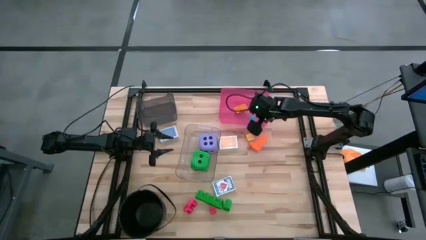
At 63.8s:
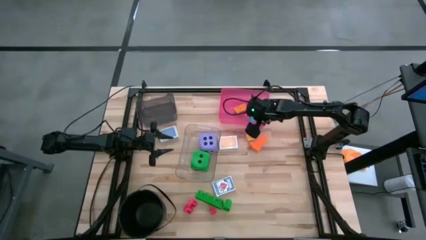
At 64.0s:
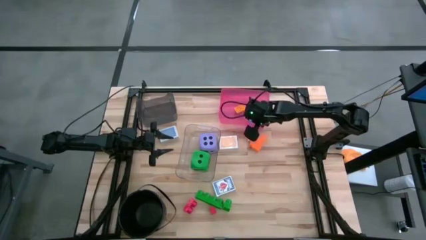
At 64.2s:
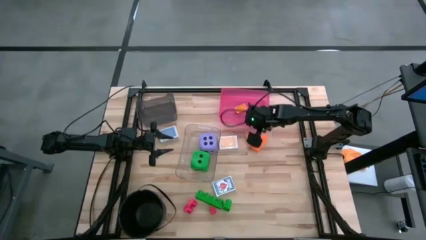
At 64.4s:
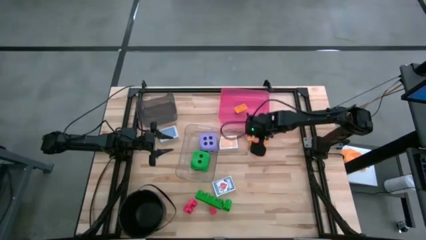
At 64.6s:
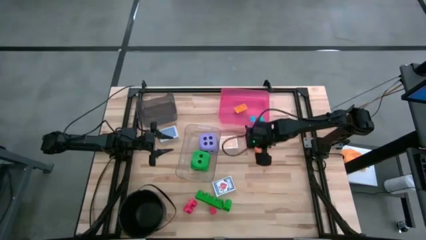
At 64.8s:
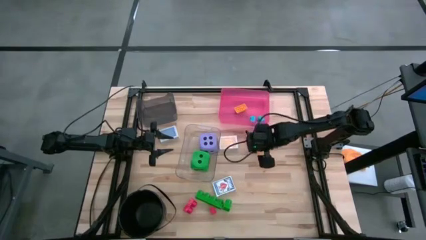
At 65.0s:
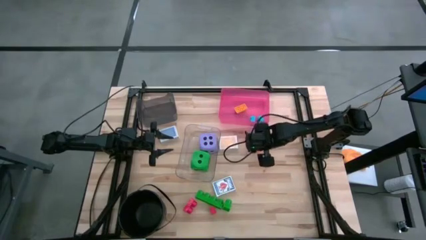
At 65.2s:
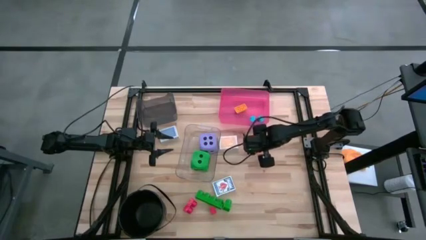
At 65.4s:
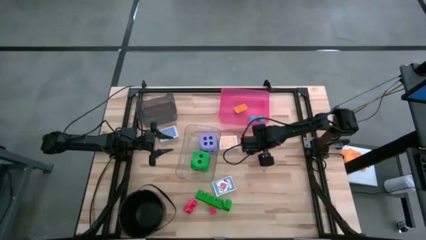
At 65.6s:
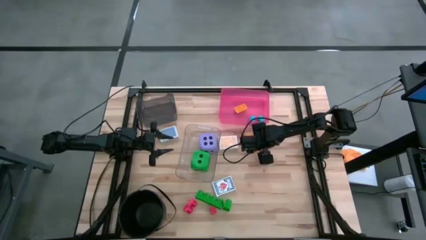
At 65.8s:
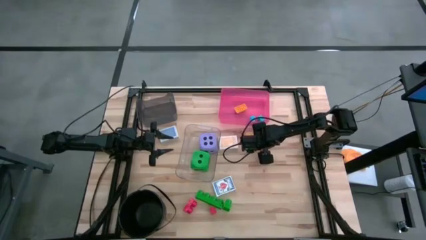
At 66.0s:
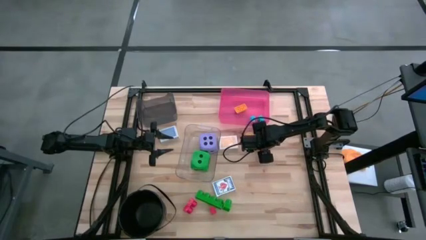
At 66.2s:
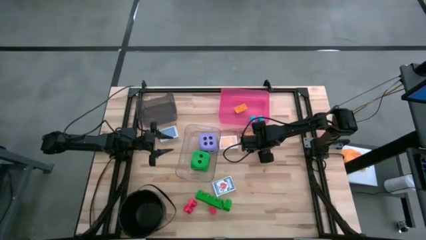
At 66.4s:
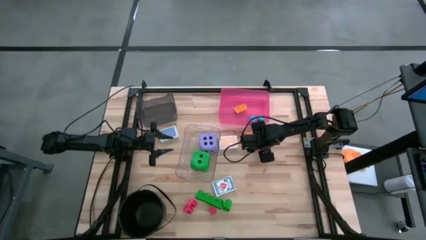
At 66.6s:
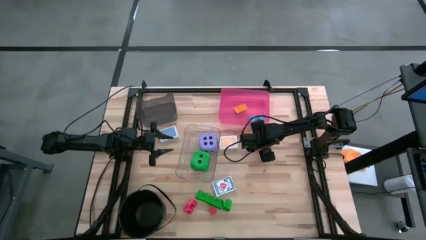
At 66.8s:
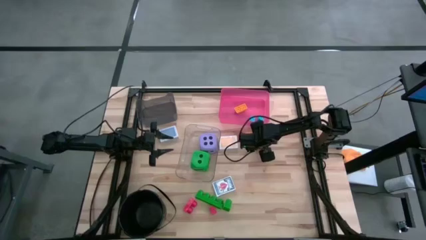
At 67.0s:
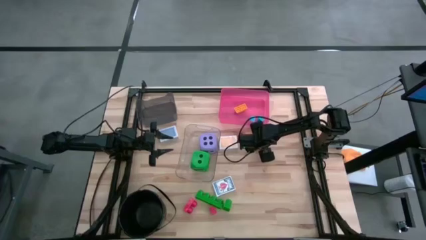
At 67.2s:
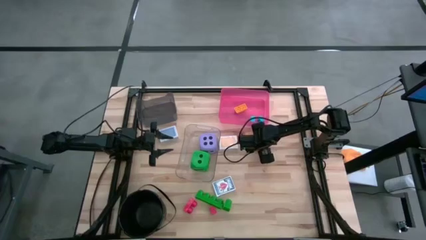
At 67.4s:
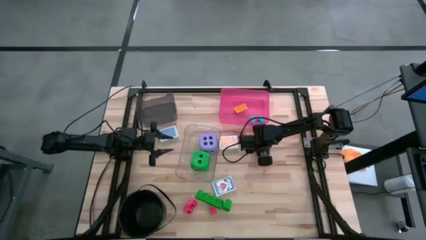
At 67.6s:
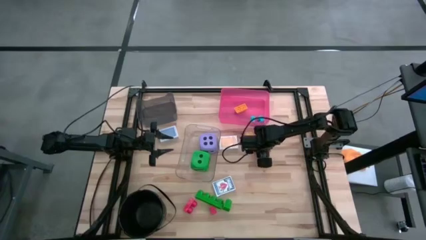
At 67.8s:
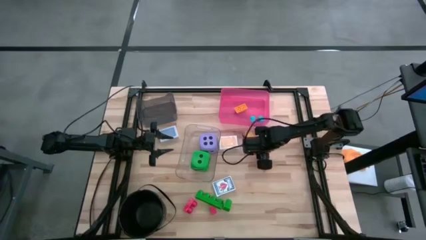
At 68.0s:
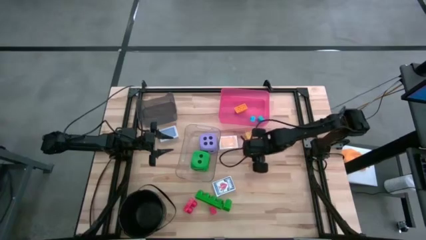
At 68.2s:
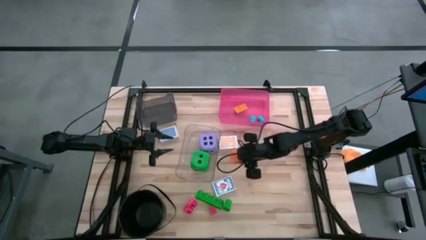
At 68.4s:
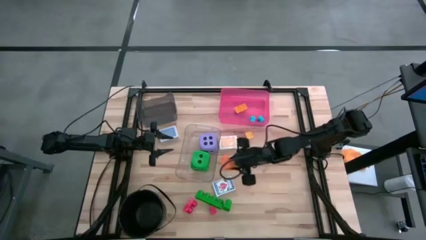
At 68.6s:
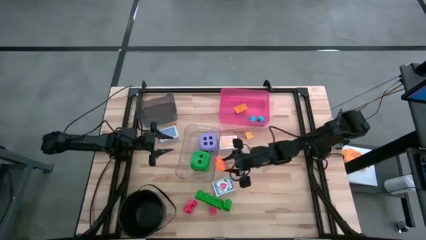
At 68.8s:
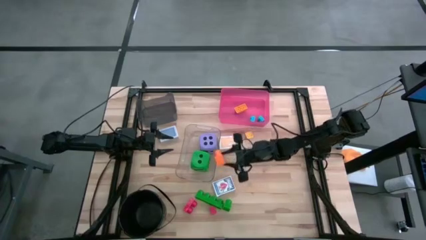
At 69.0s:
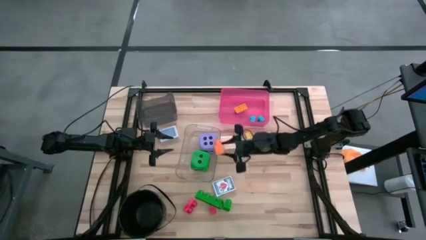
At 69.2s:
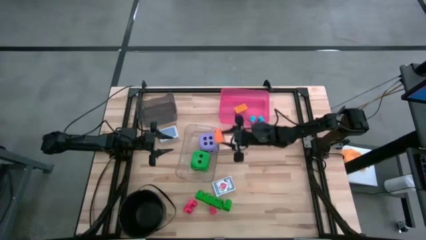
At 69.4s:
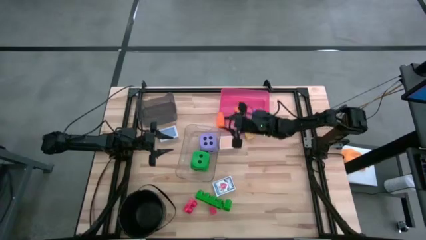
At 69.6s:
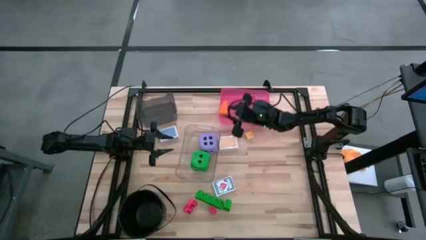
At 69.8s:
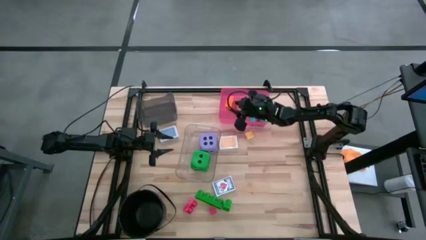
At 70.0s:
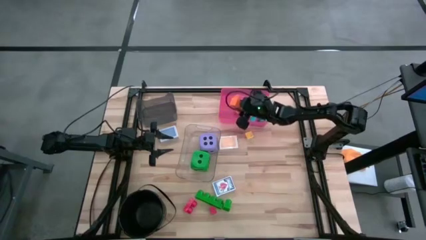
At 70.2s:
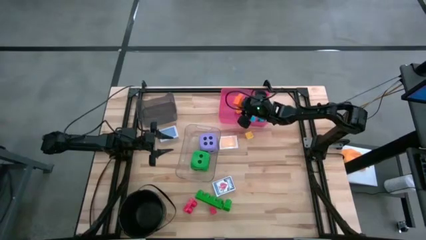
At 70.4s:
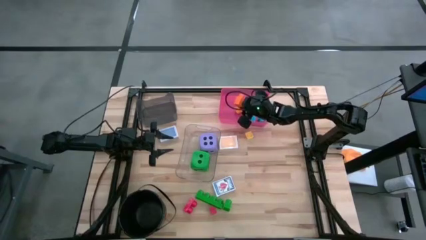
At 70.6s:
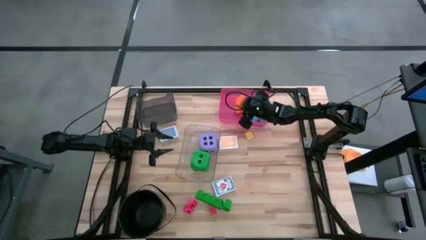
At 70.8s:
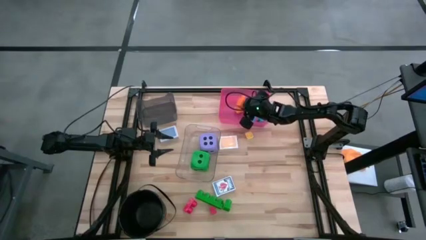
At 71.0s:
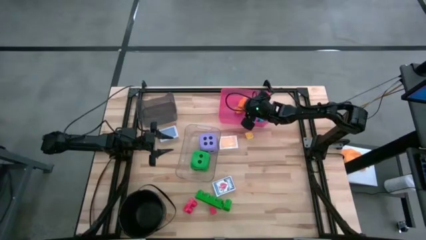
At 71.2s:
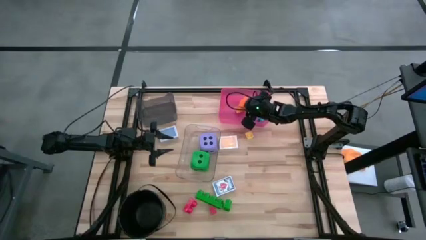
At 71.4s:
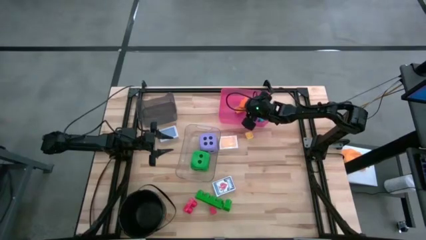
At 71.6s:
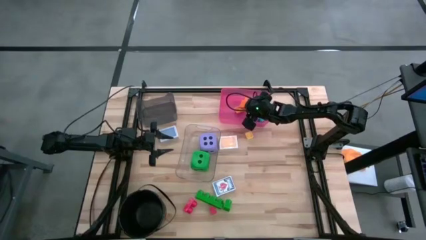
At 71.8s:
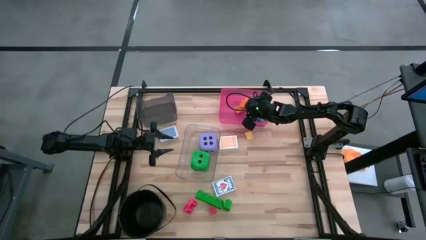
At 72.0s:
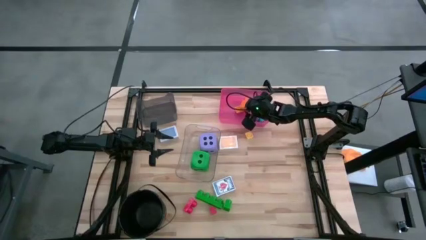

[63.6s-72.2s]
Task: Pick & Place Toys
Put the orange game piece into the pink bin

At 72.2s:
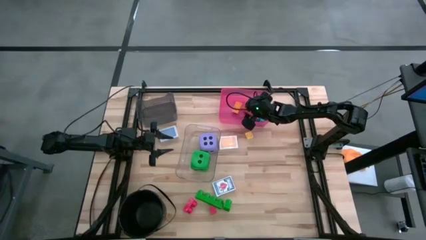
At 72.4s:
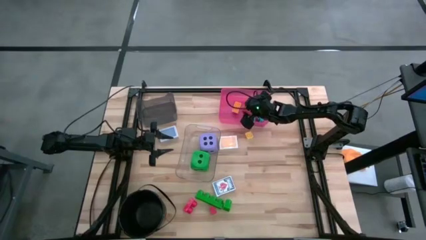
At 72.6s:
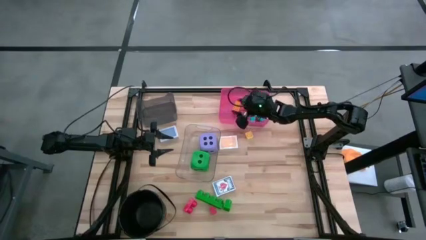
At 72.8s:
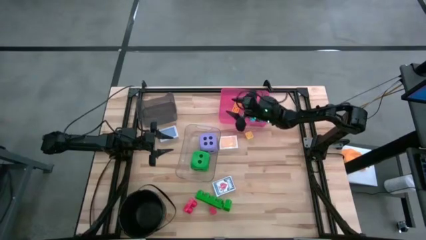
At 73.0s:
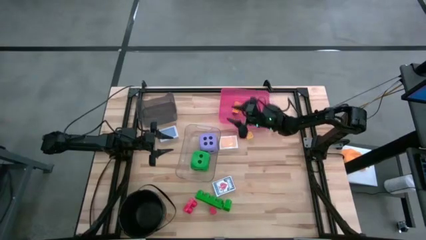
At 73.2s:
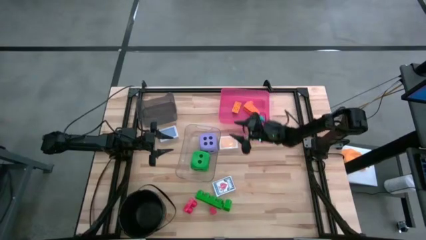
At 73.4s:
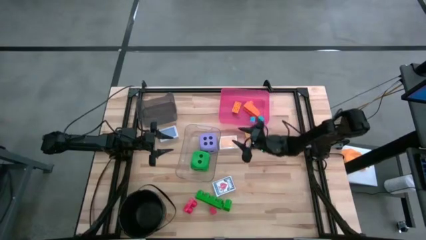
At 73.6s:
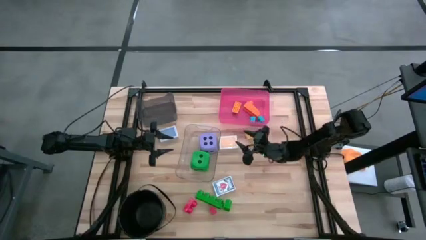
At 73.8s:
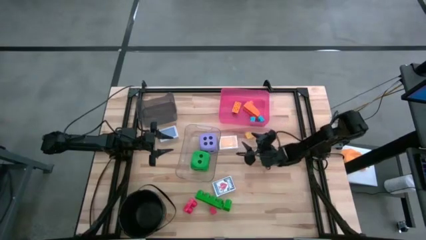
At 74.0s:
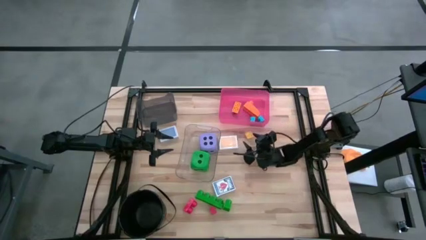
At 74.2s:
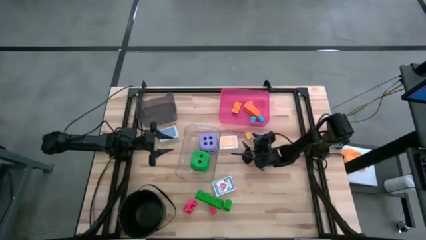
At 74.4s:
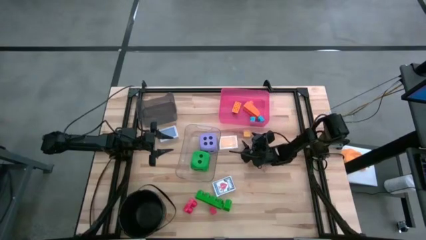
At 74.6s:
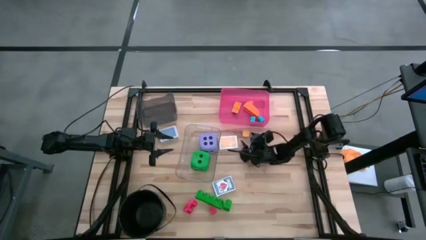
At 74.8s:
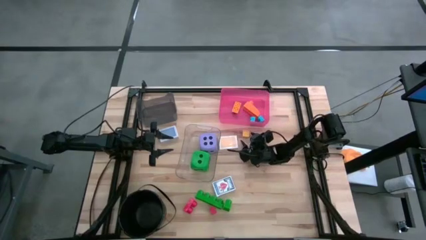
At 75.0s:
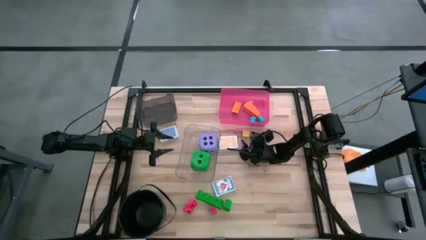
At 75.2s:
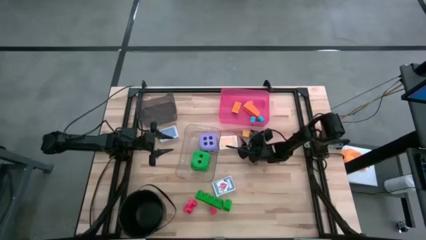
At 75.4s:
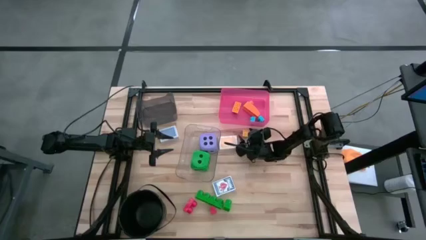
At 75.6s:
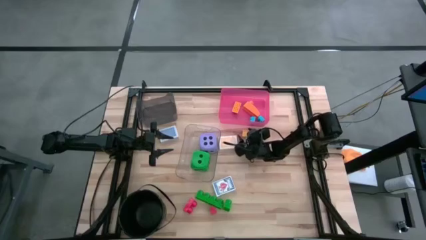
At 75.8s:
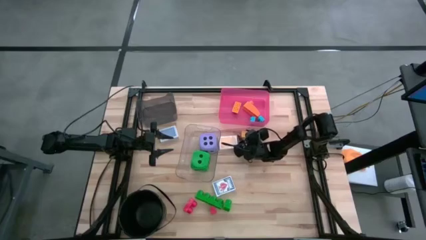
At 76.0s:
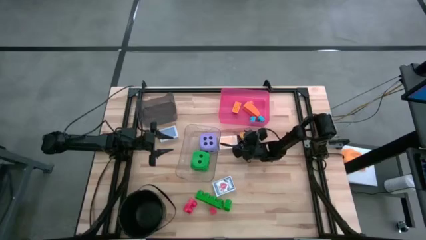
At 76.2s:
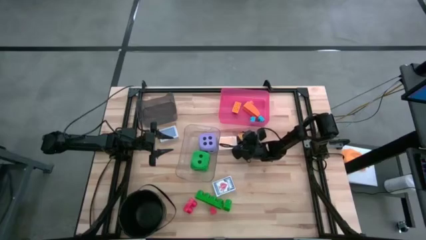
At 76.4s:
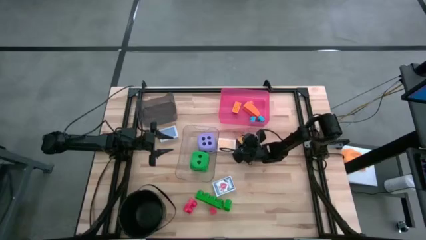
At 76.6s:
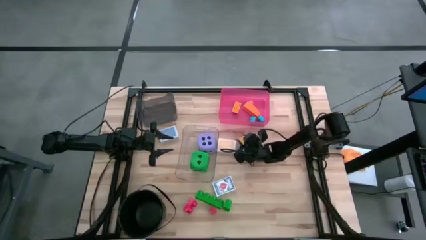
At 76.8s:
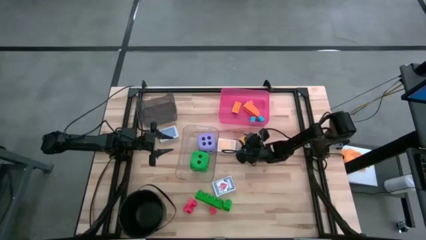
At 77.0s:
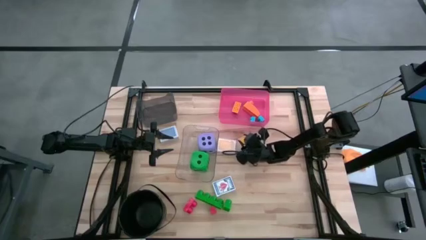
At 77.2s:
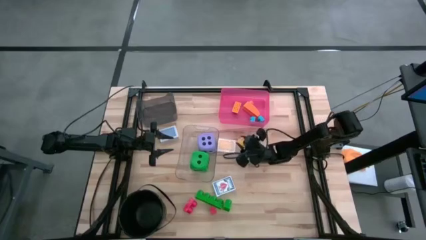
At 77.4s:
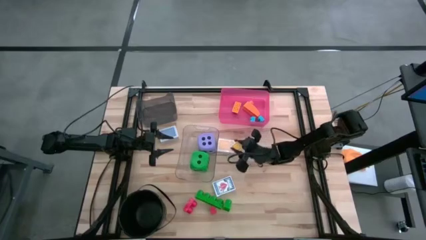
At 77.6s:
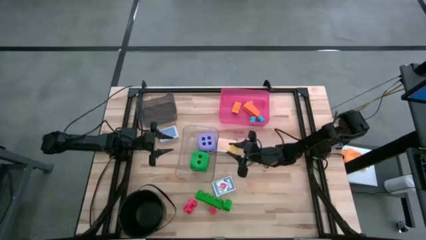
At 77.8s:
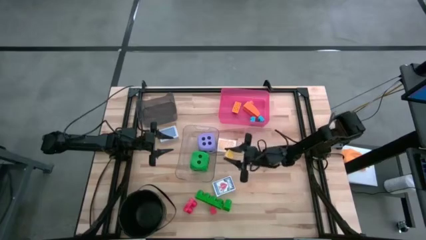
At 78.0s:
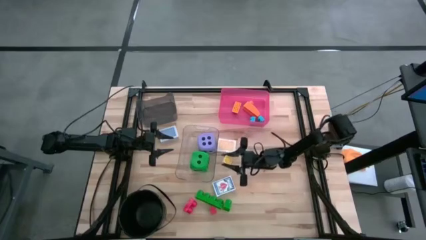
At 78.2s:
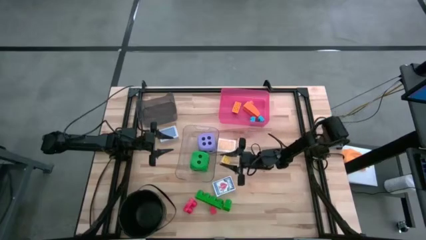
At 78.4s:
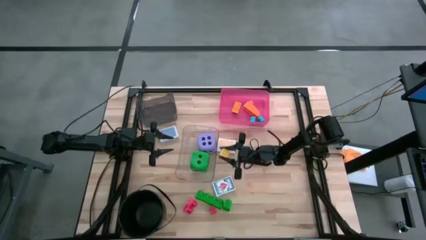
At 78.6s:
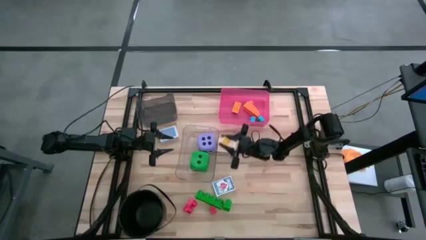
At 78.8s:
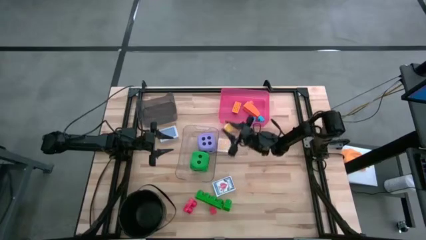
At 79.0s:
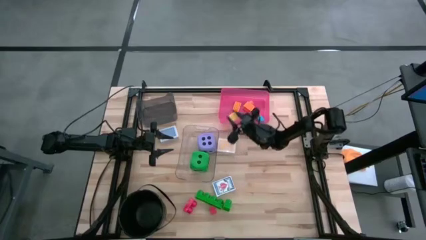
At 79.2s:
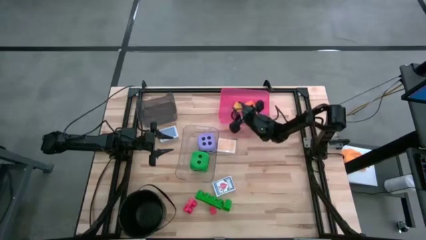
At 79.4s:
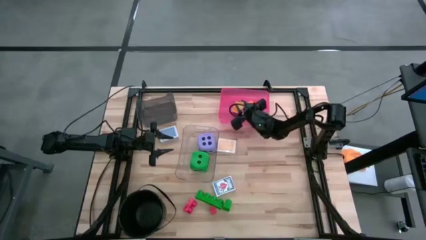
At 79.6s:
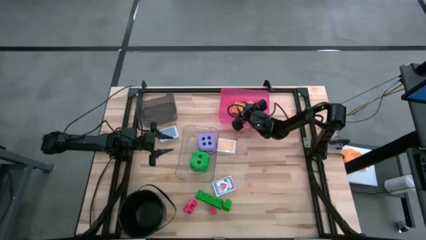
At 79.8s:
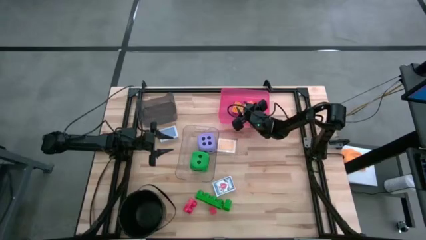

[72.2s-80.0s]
Put the yellow game piece into the pink bin
